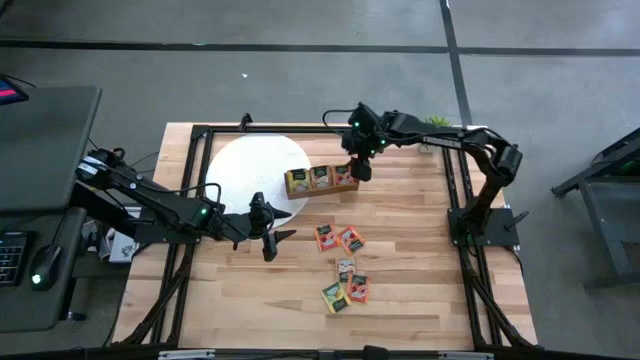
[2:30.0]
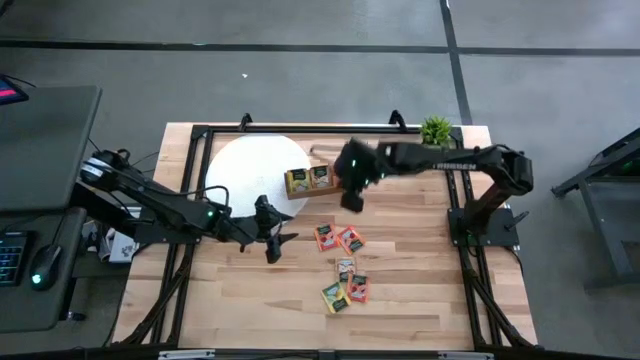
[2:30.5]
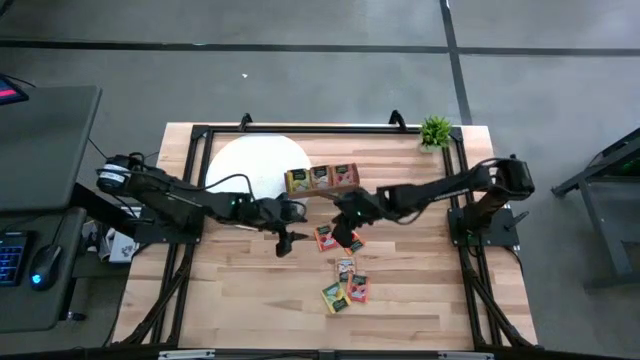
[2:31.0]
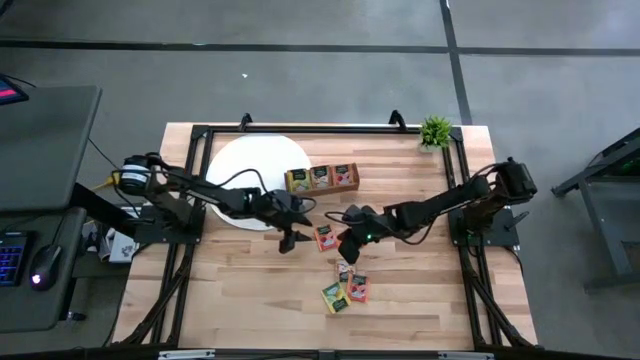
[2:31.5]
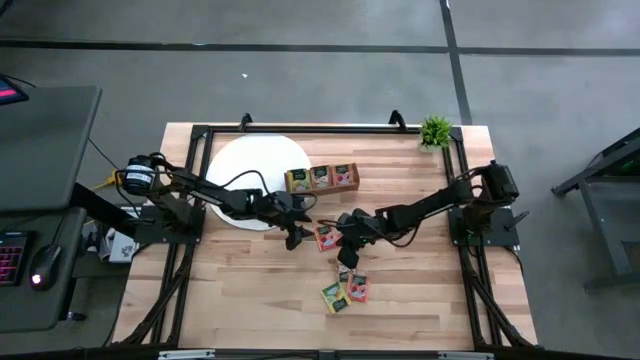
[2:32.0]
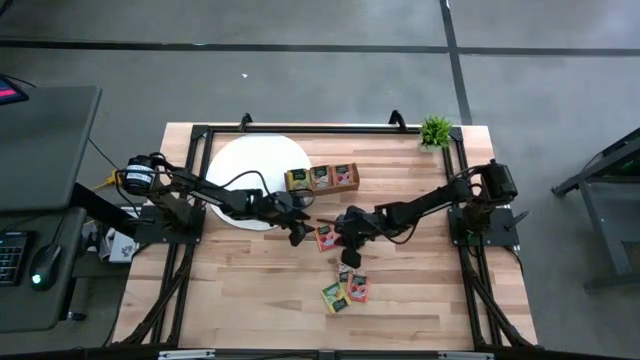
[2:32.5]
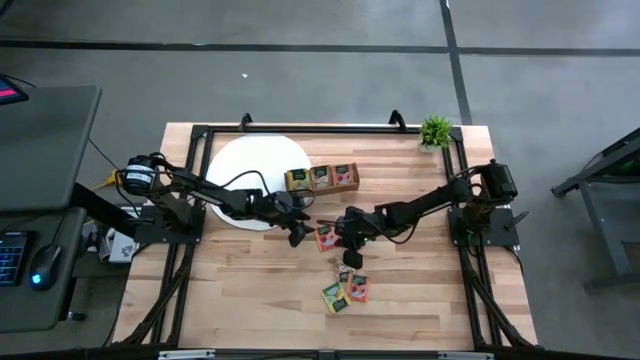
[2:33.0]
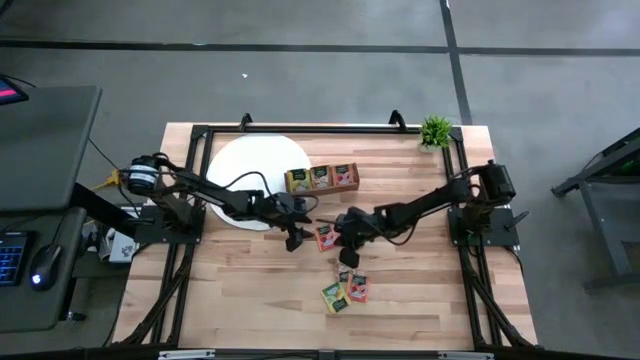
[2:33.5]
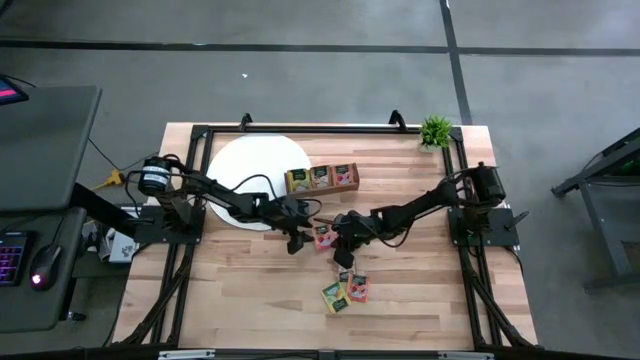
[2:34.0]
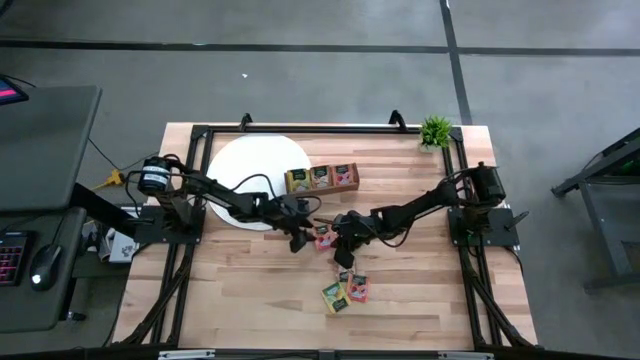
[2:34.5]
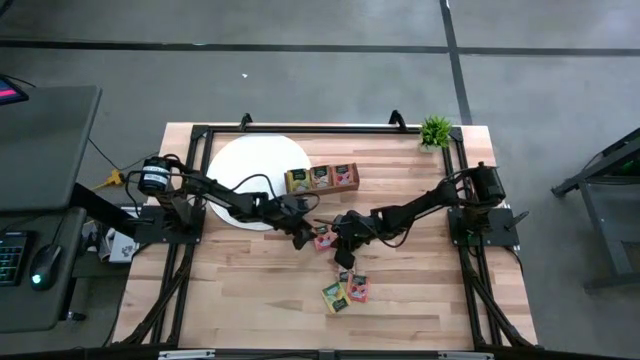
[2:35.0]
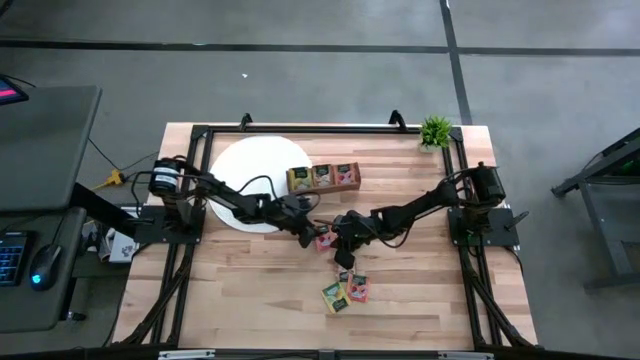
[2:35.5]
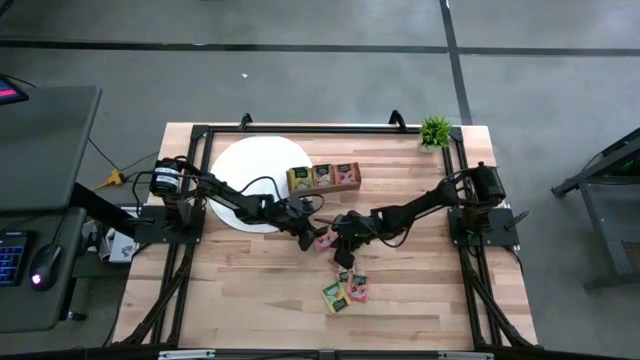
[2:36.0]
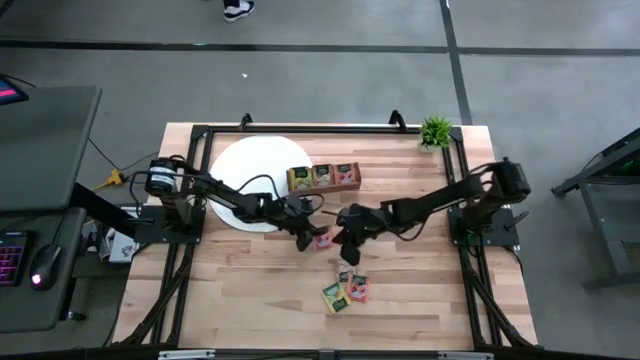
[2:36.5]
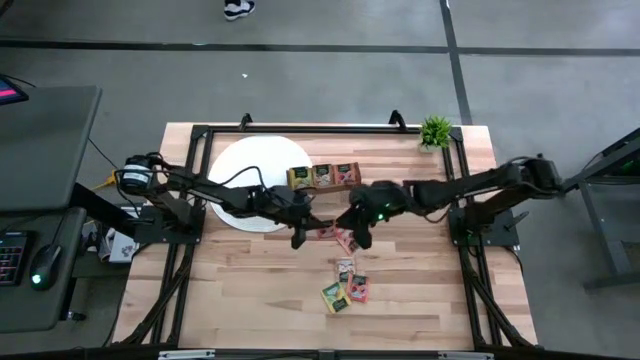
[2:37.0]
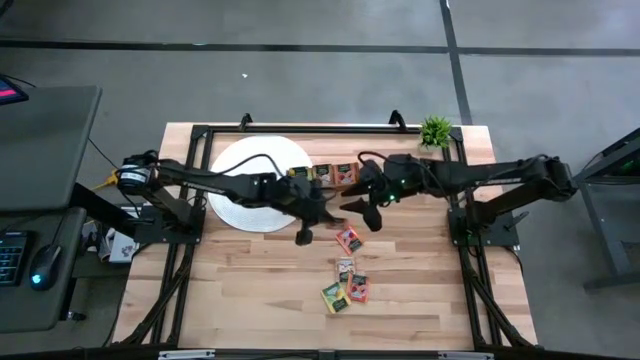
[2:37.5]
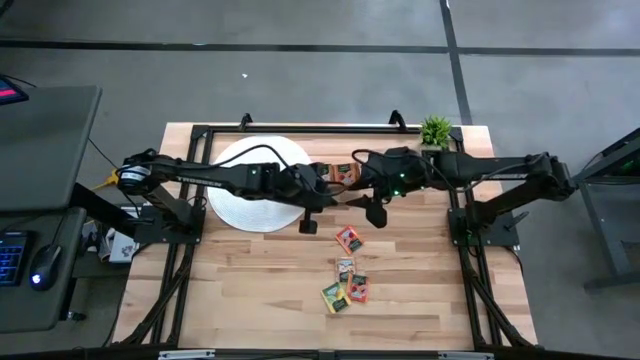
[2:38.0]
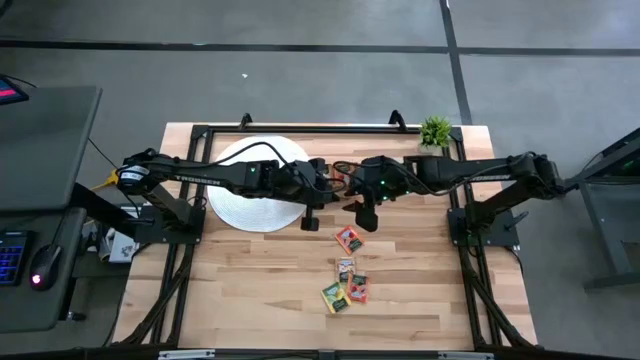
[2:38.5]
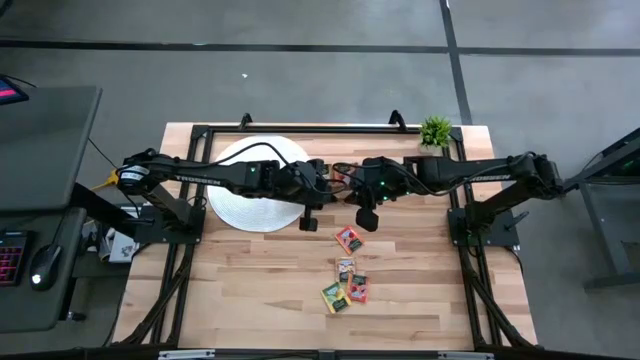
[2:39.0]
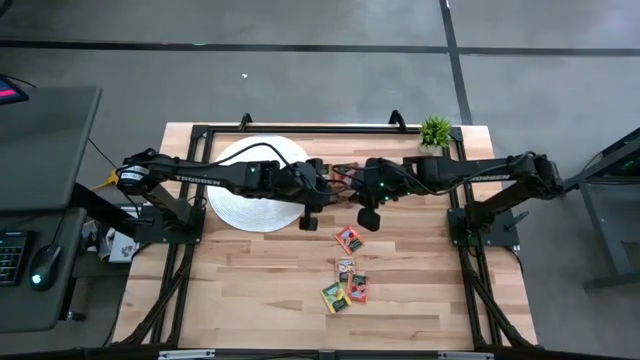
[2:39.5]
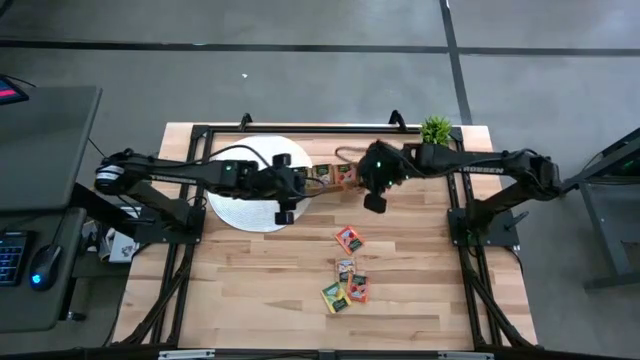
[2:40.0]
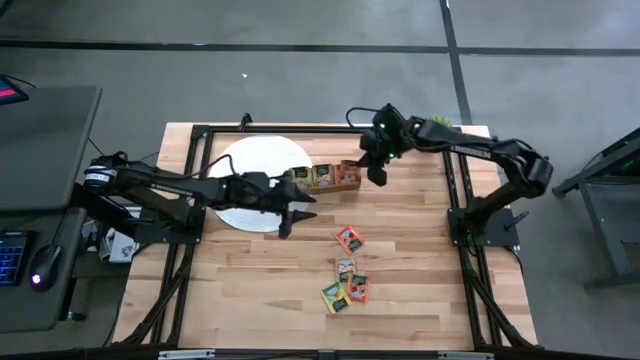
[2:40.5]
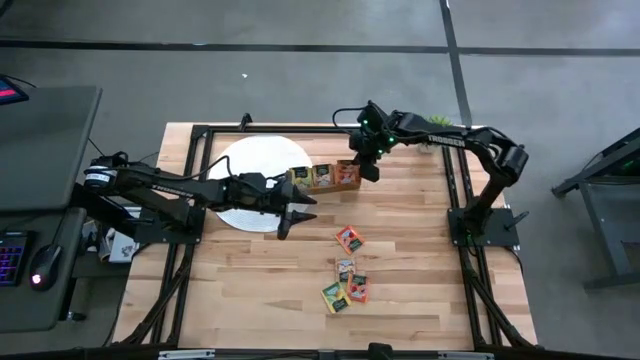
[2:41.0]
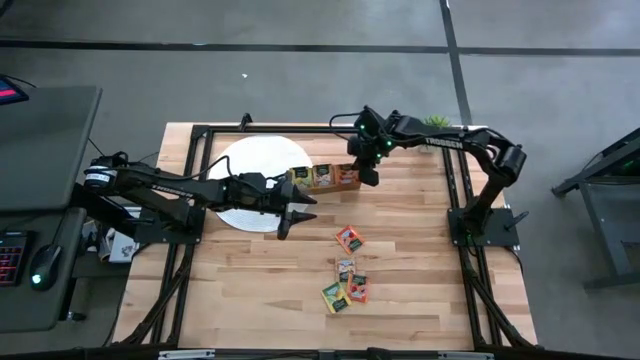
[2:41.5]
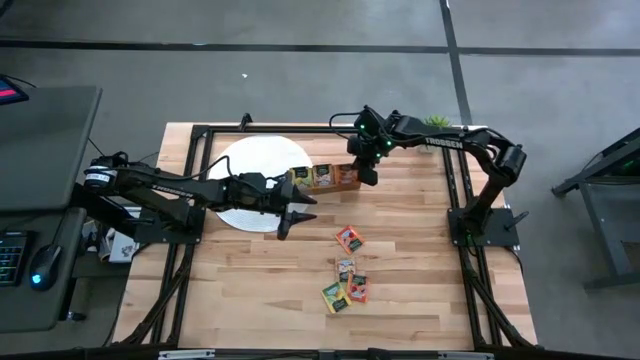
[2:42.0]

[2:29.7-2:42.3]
Task: Pick & Place Tea
Put the orange tea bag into the right compartment of the wooden organizer

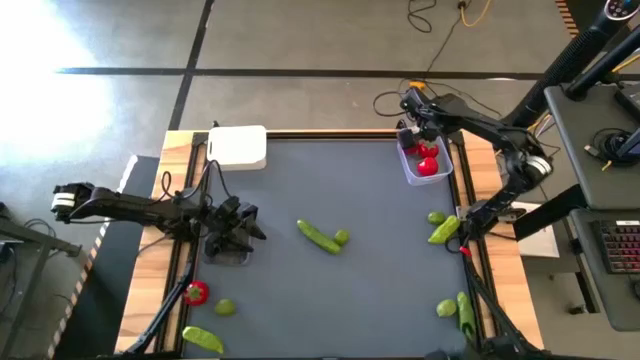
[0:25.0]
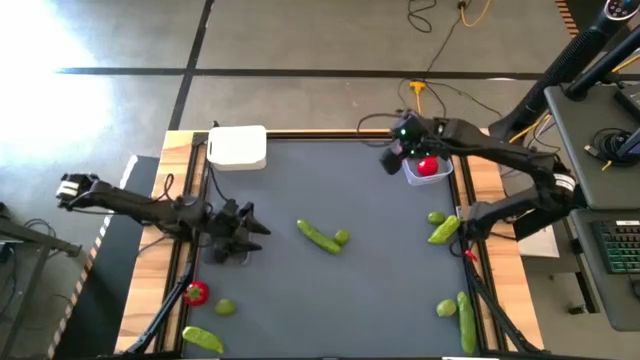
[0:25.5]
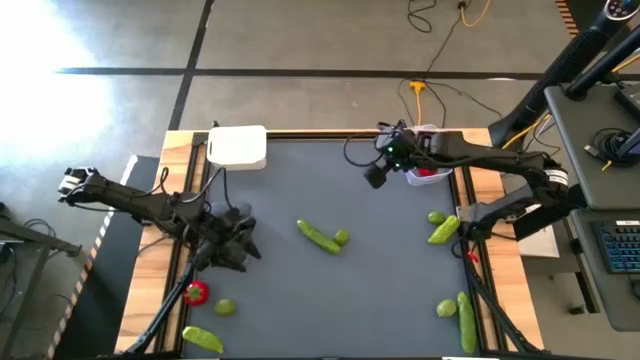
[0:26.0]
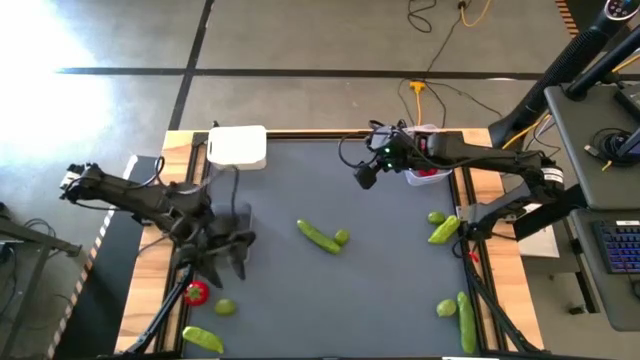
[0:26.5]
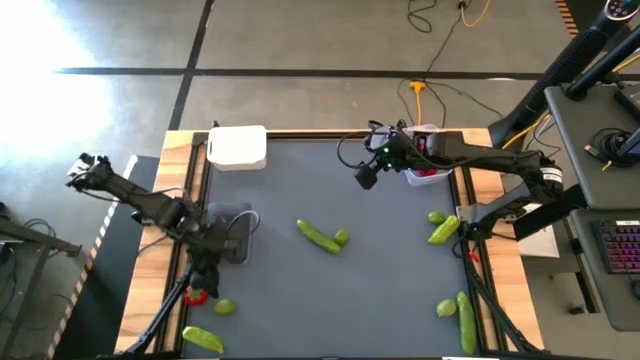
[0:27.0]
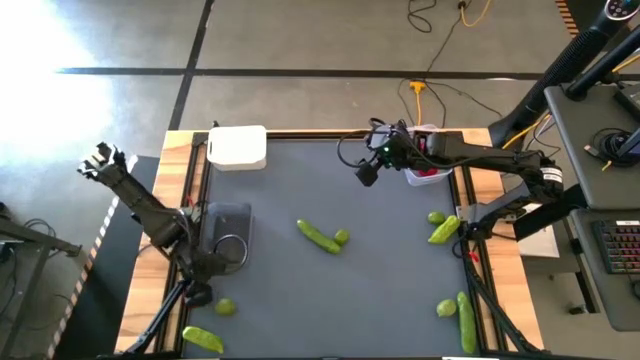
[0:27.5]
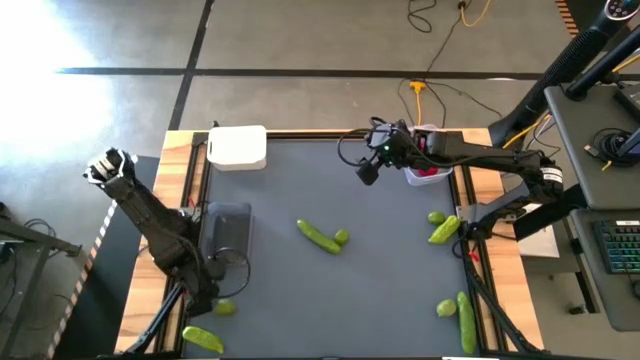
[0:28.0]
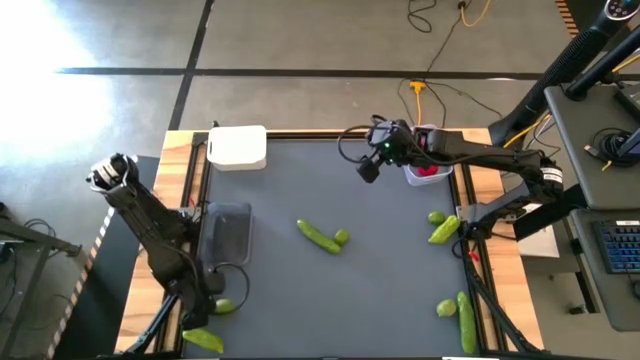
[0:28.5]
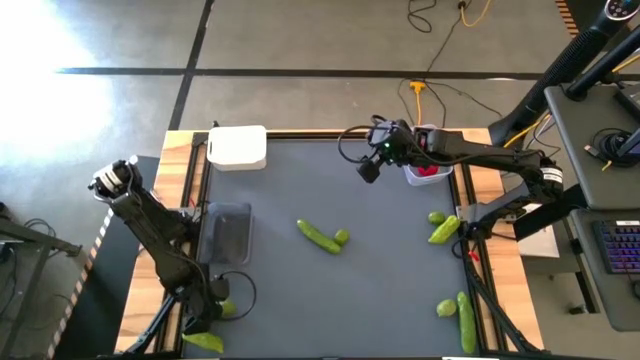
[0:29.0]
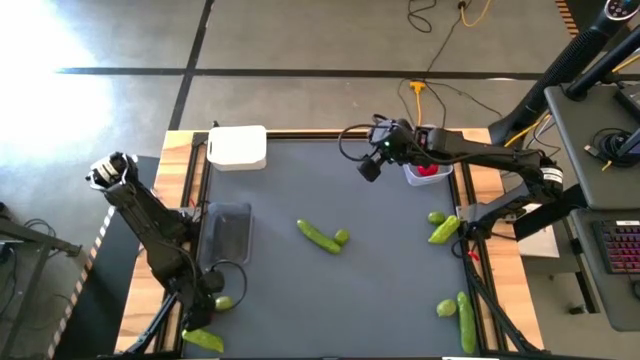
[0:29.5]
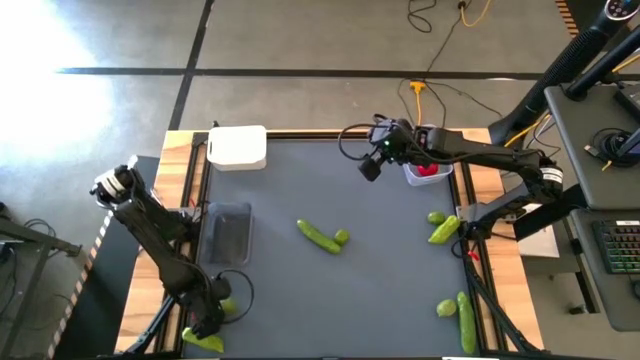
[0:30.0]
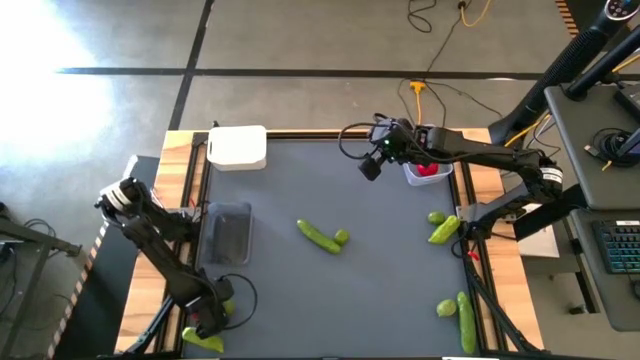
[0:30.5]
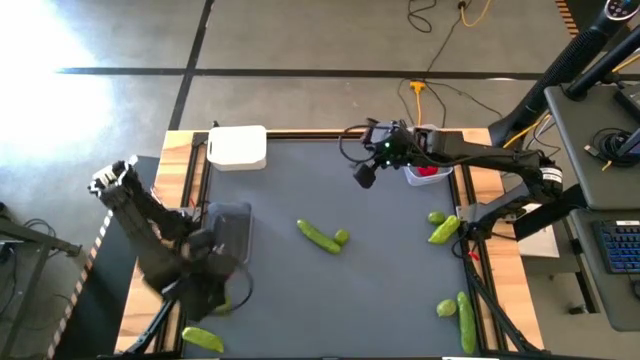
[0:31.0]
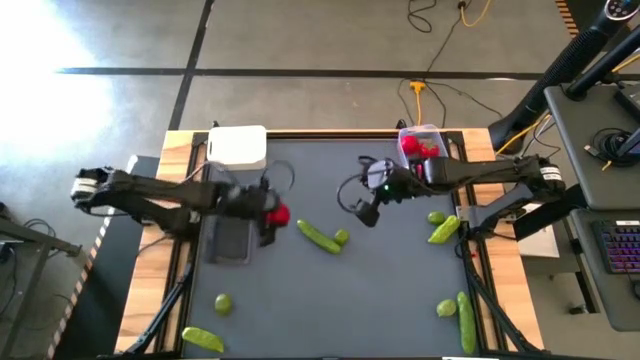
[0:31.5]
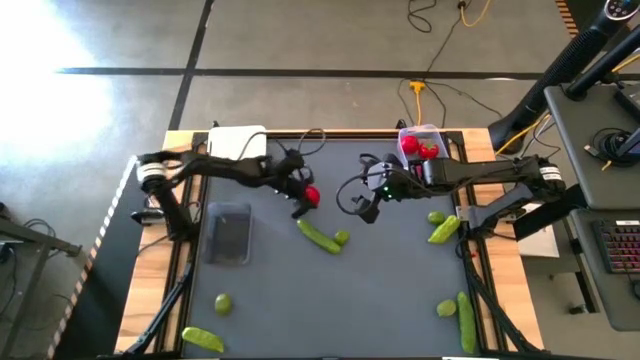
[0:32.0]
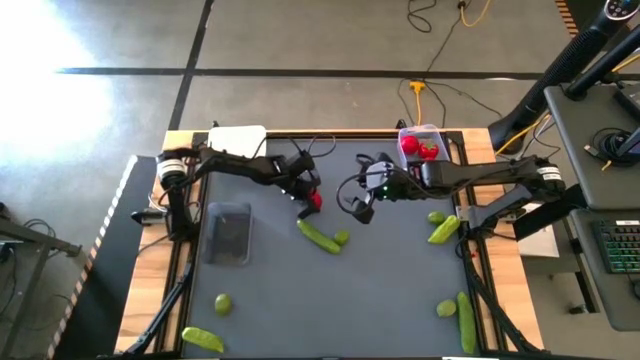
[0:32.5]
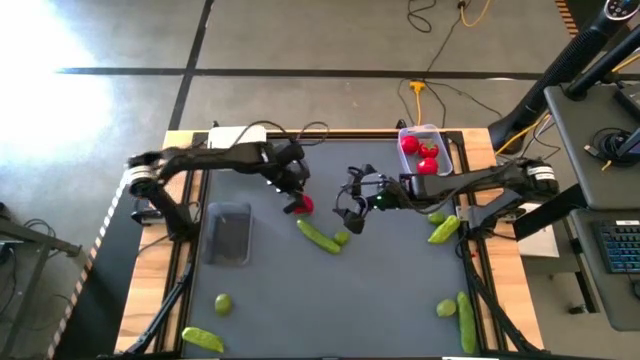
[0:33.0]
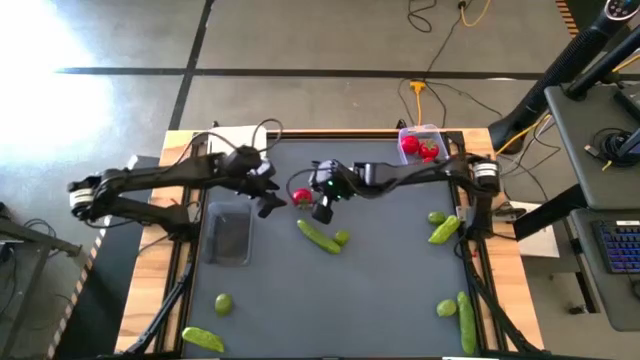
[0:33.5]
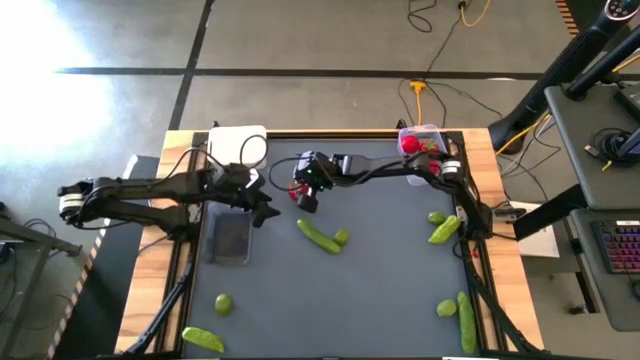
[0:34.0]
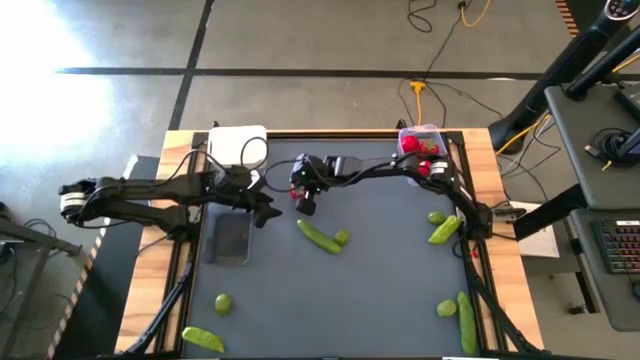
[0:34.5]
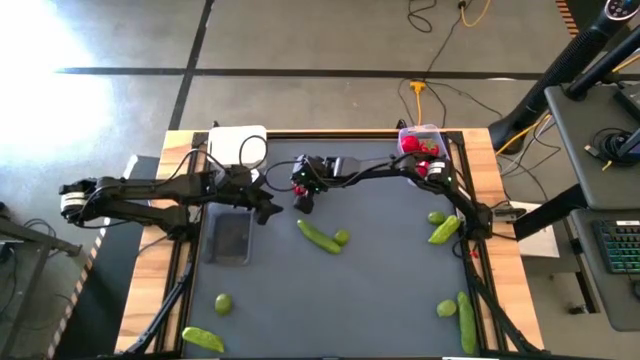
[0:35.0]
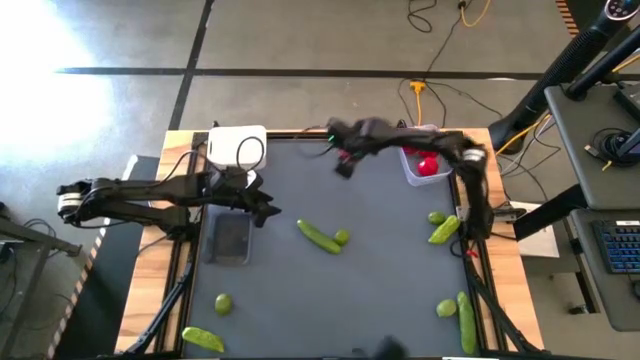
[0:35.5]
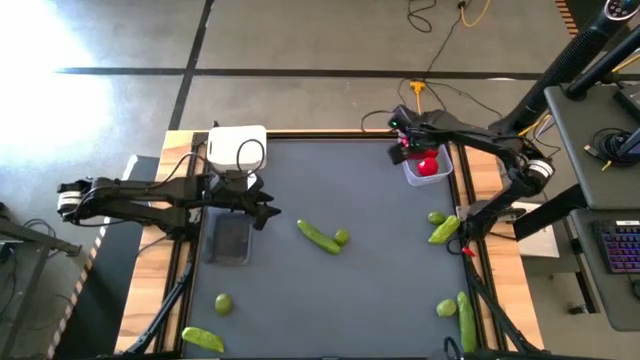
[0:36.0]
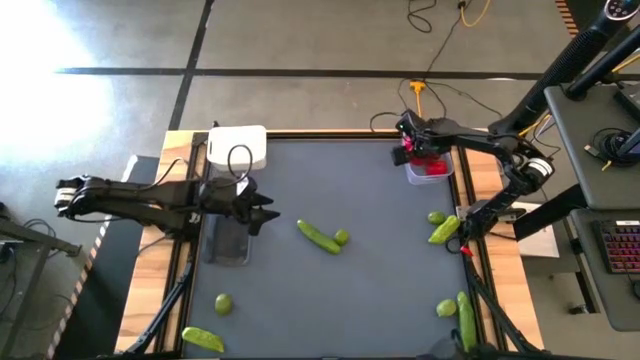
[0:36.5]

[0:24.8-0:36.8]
Task: Sort produce into baskets
Put the red tomato into the transparent bin
